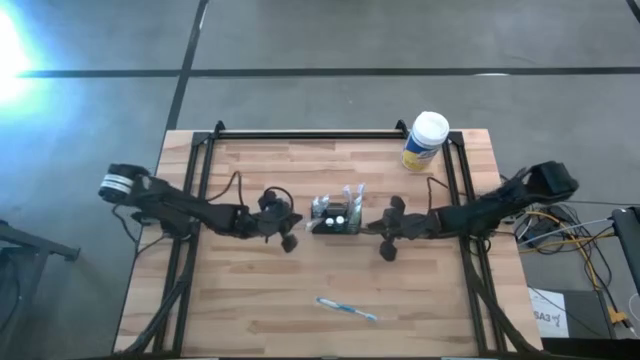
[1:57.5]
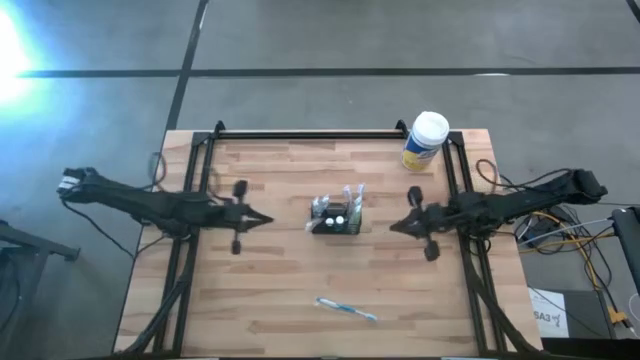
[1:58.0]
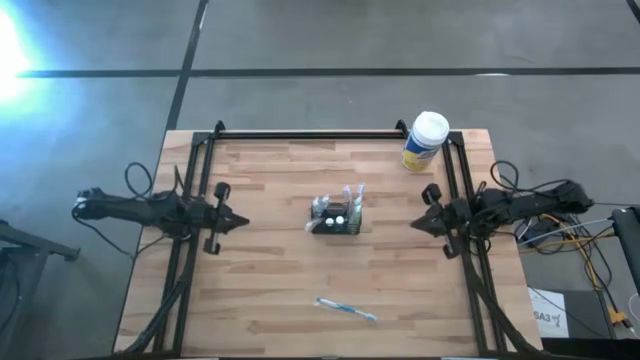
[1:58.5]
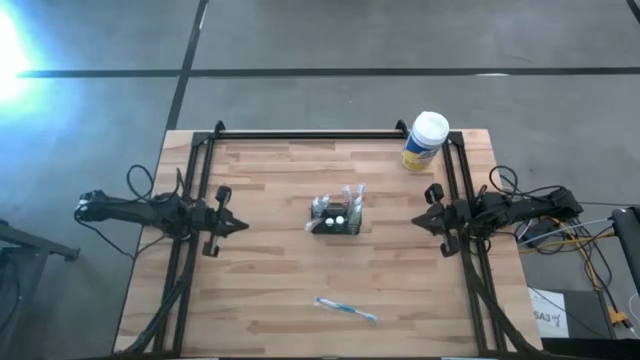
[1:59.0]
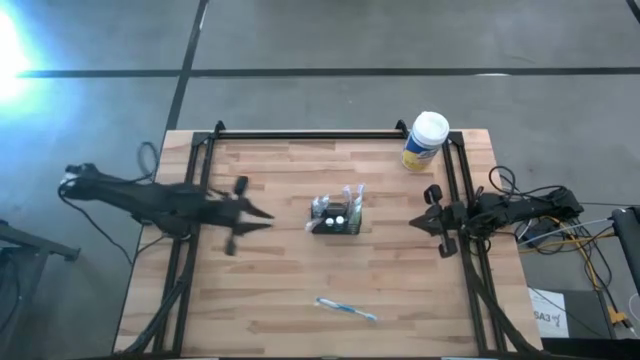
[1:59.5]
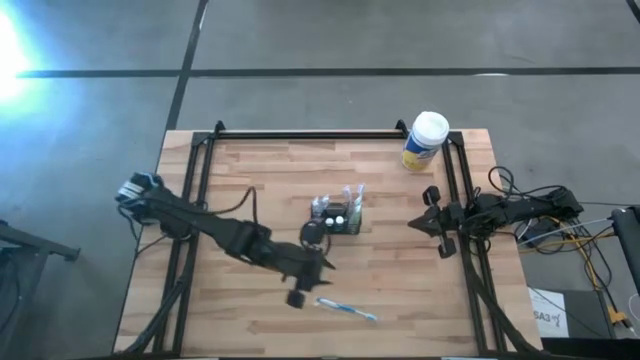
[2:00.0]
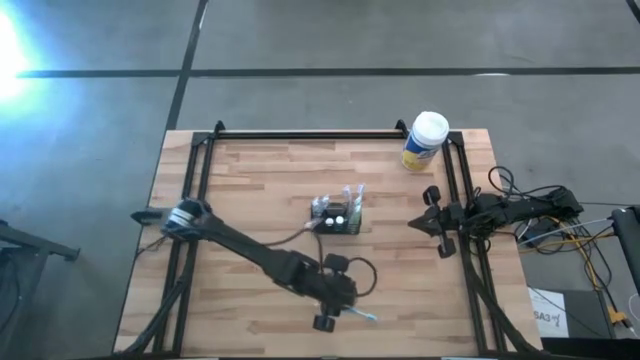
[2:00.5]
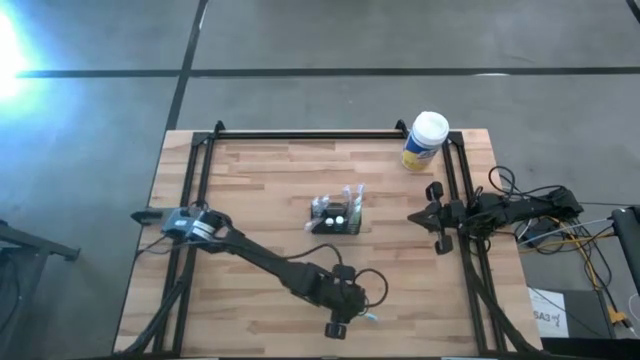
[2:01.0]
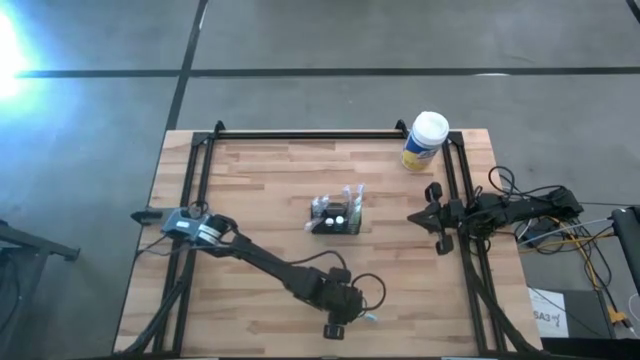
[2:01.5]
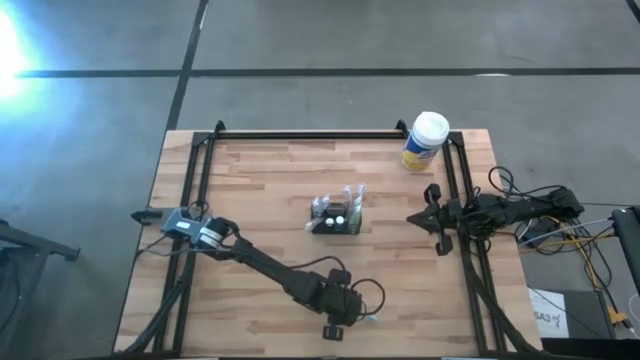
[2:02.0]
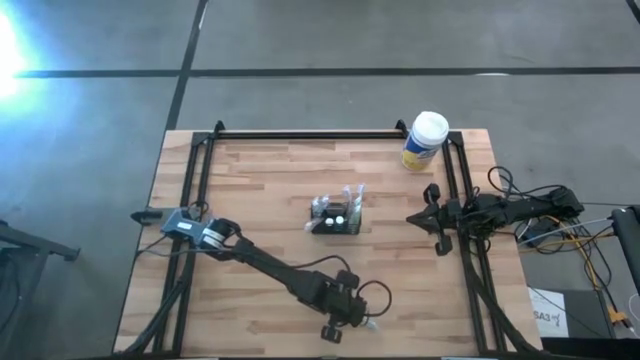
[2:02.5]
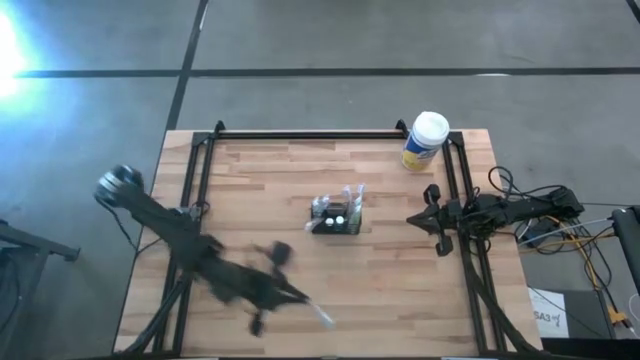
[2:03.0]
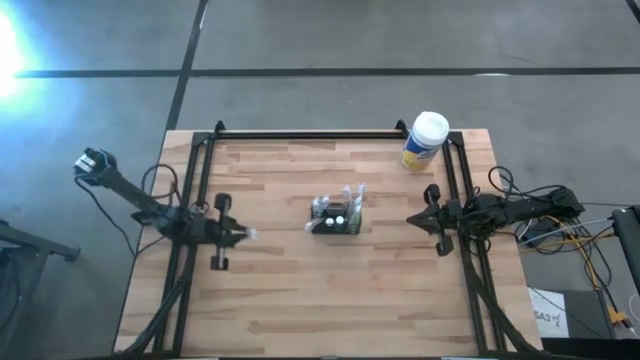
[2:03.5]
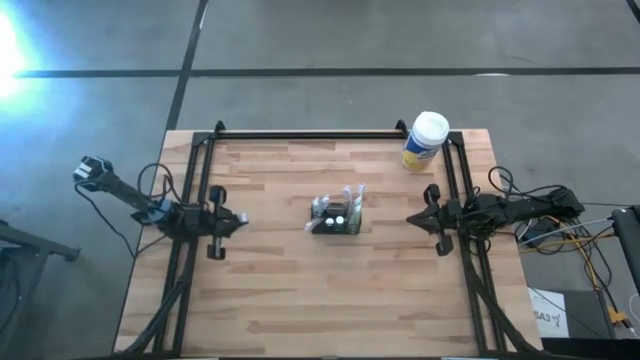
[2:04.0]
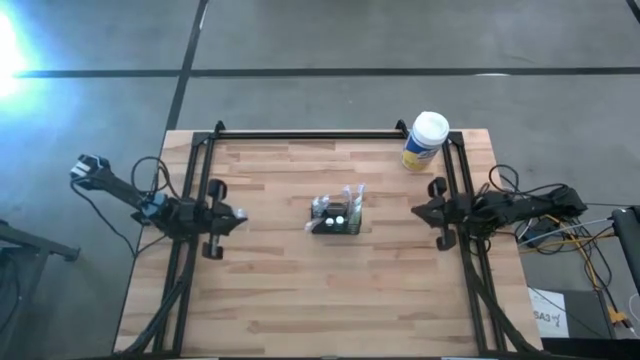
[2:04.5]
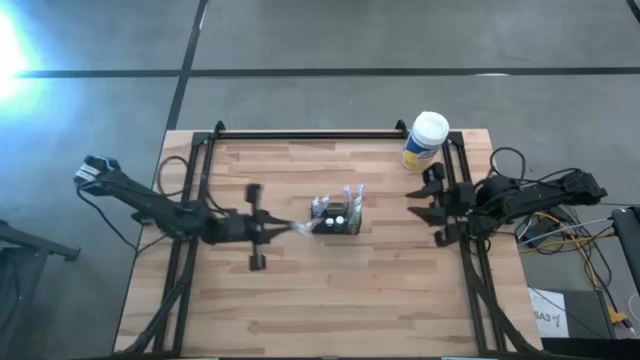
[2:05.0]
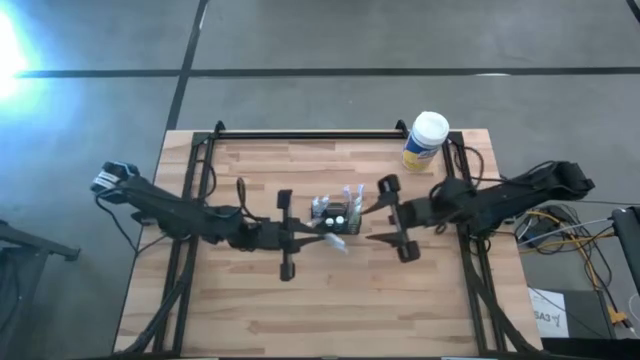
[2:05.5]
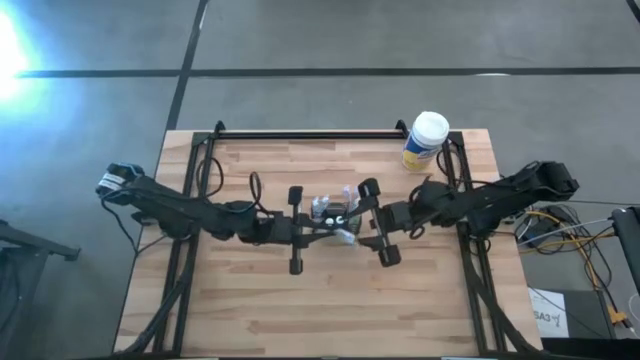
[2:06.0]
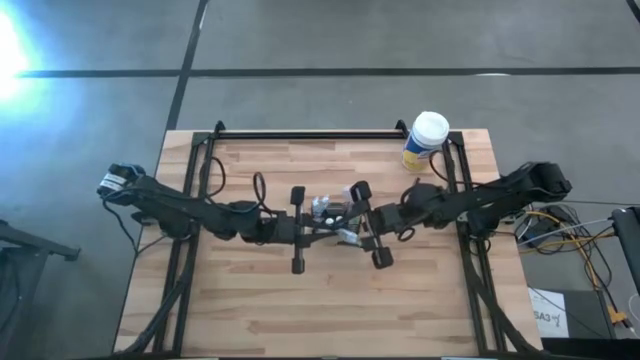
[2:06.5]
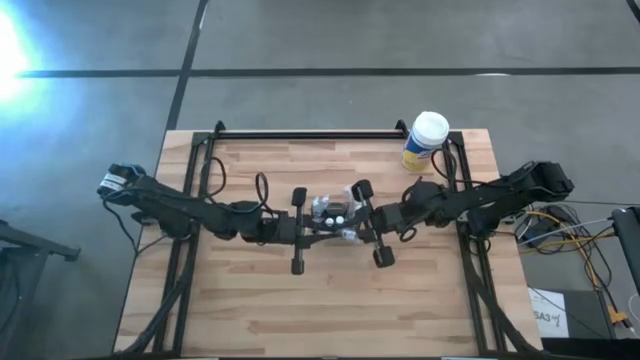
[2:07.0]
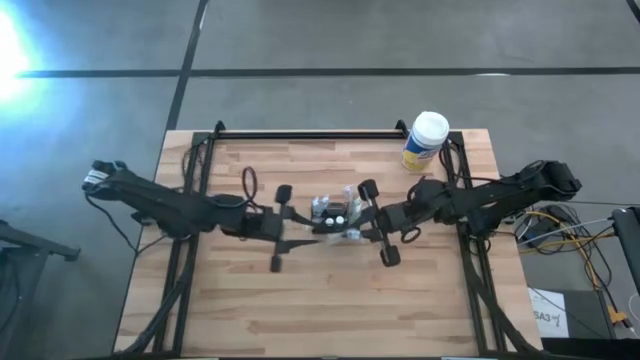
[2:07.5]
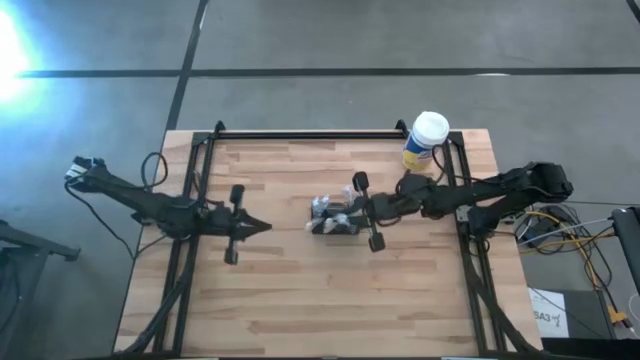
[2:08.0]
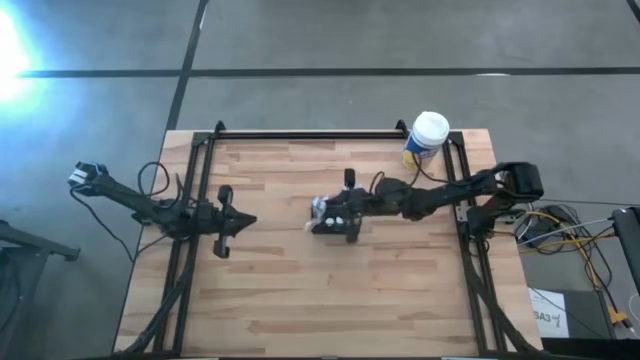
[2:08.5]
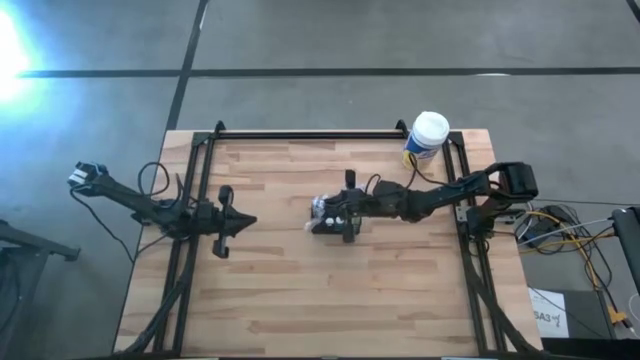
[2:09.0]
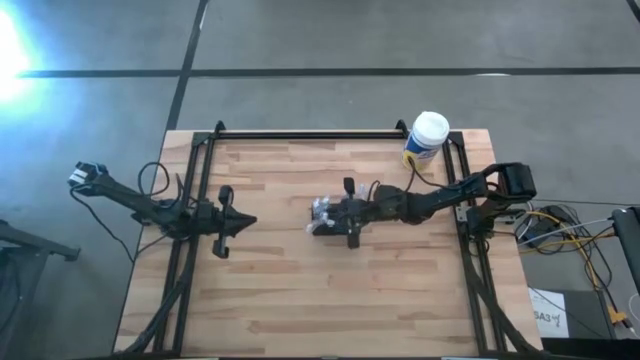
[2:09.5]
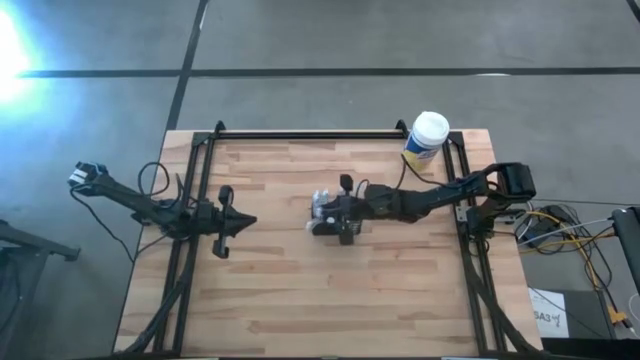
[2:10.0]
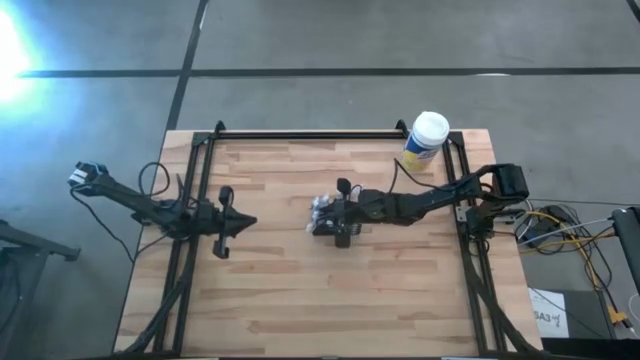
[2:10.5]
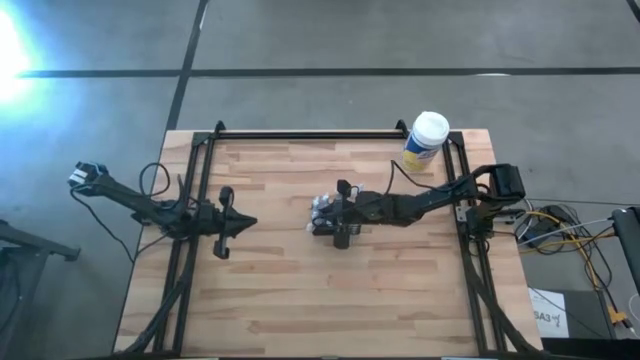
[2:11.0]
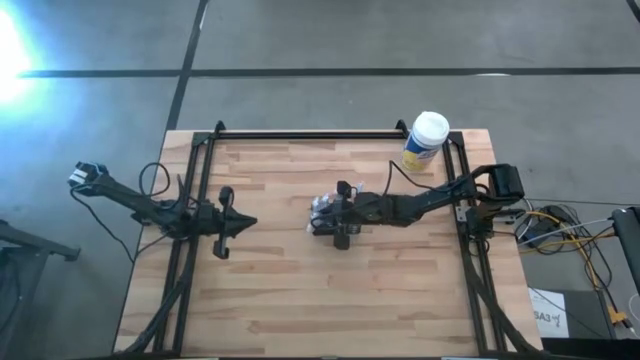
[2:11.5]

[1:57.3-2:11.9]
Task: Pick & Place toothbrushing station
Put the blue toothbrush into the wire organizer

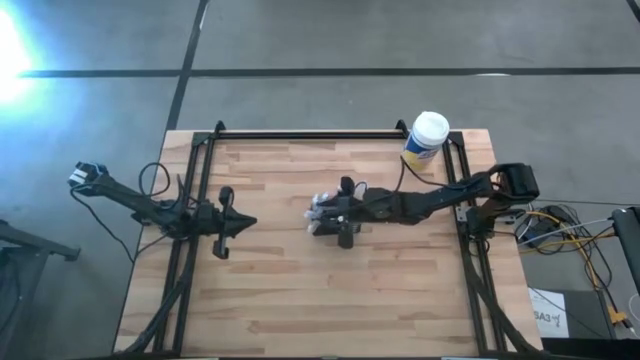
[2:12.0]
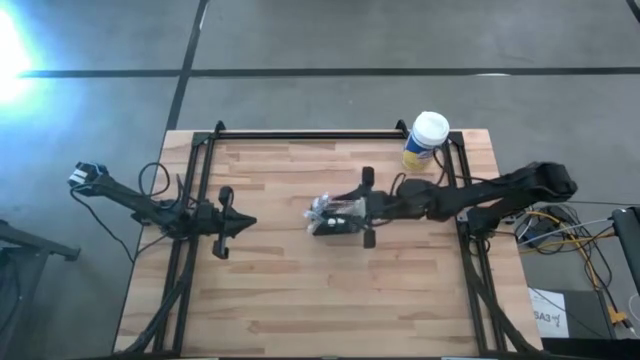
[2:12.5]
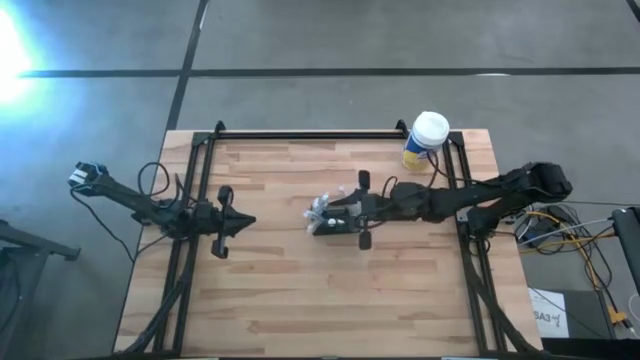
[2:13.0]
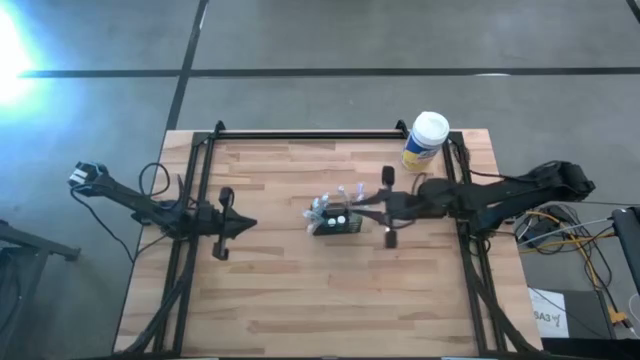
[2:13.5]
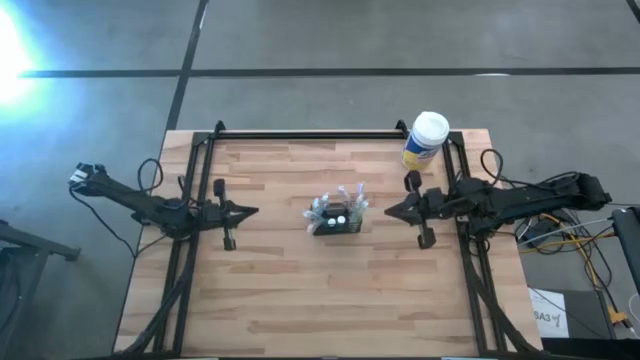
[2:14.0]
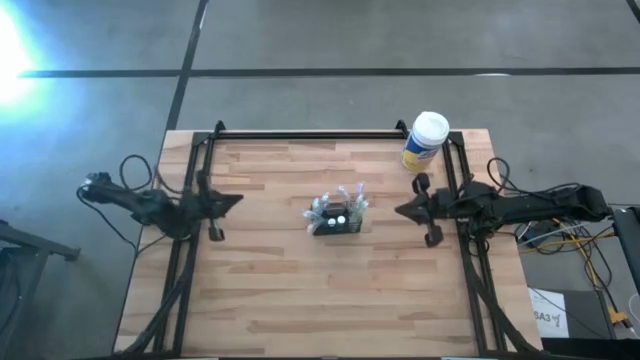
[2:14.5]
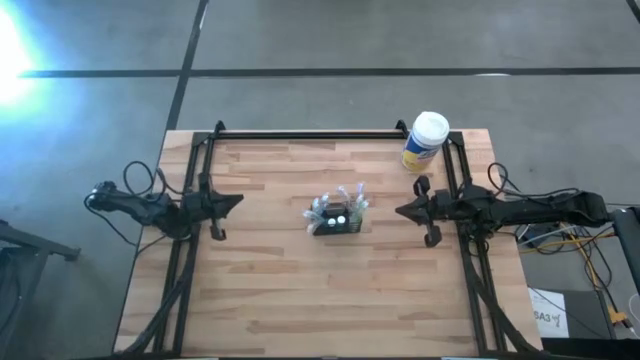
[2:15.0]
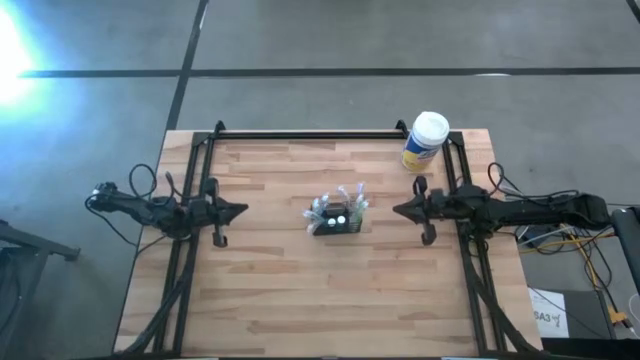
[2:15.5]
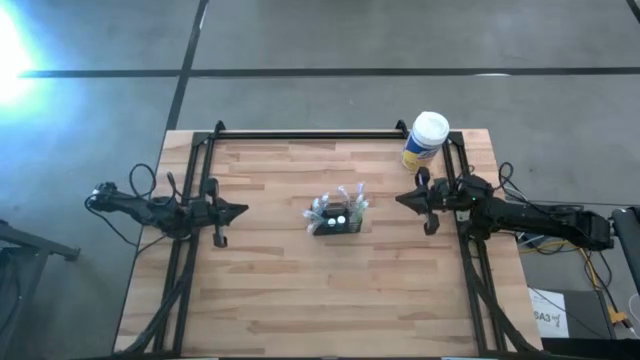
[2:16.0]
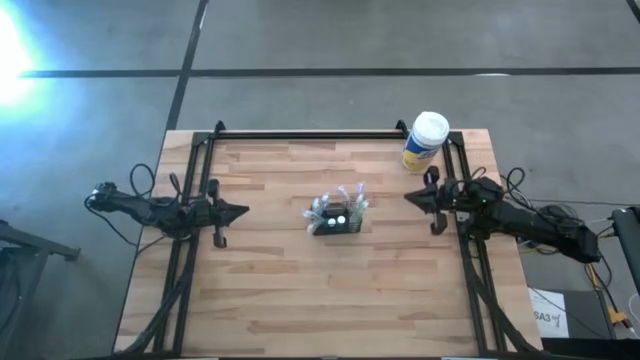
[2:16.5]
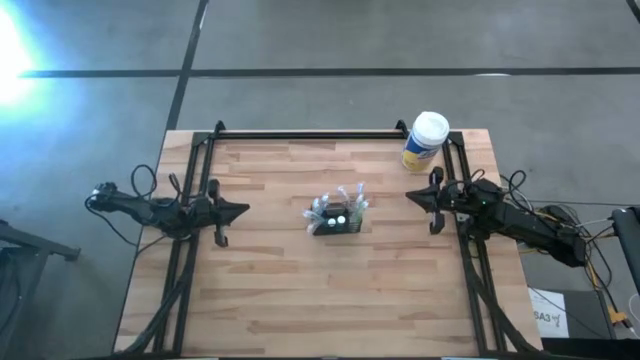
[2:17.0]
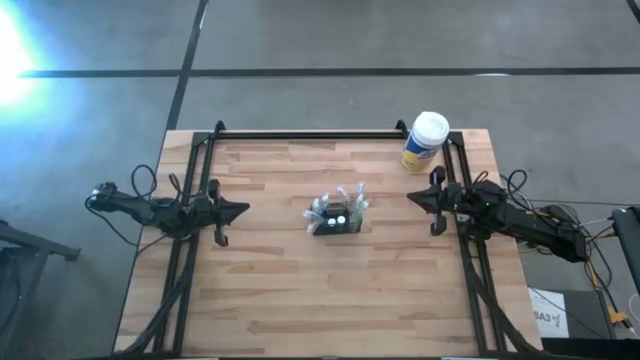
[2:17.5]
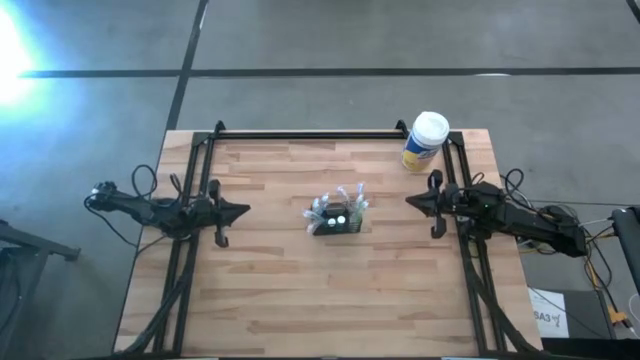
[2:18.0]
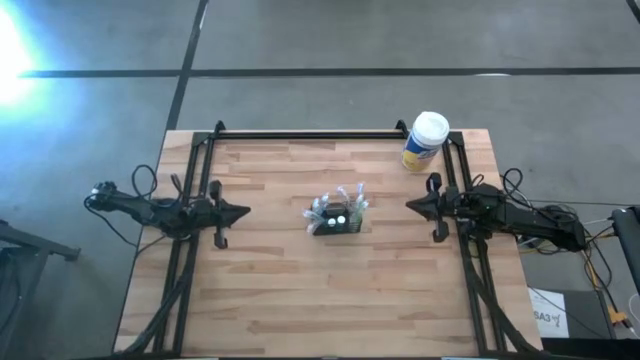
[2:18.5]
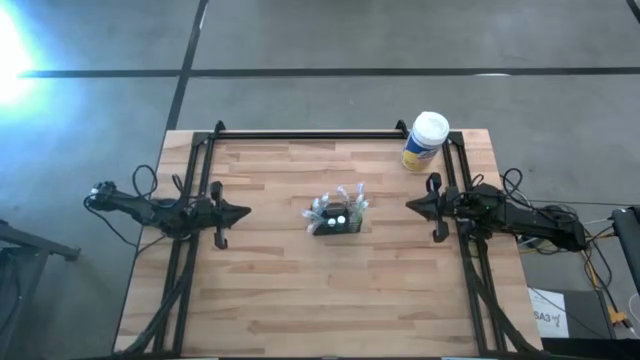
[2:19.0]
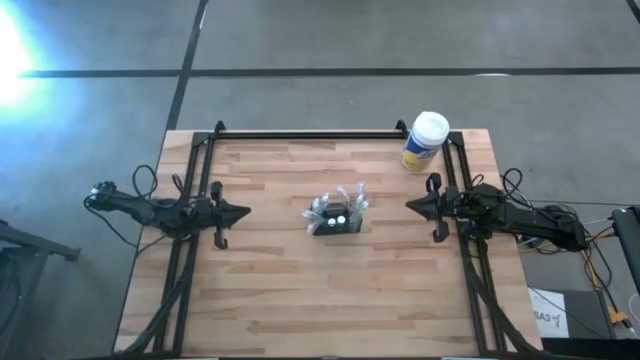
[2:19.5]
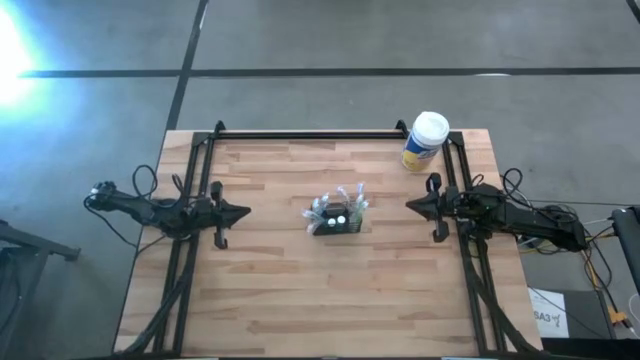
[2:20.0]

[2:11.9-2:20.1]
Return to Home Position
